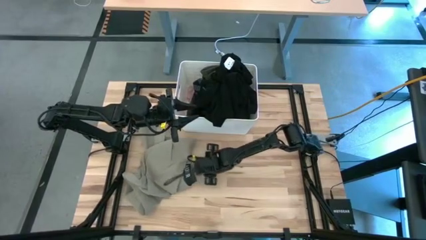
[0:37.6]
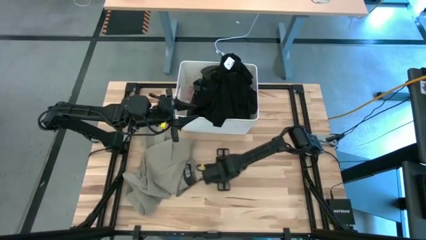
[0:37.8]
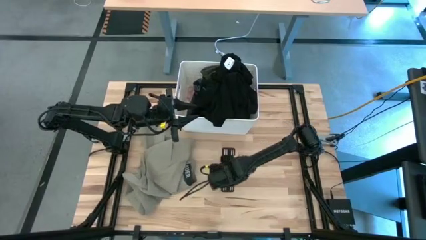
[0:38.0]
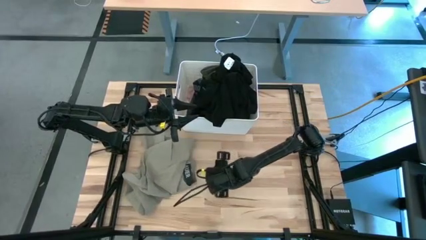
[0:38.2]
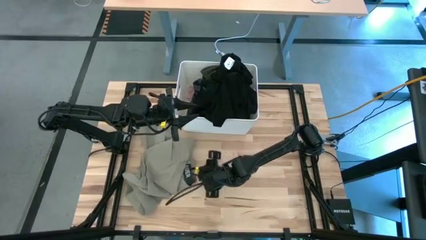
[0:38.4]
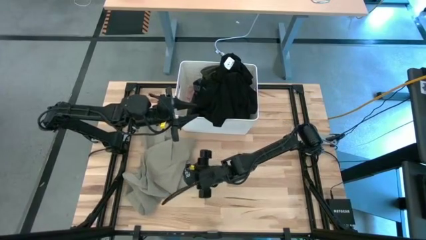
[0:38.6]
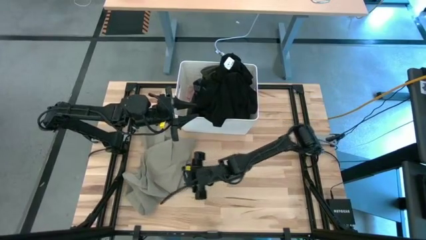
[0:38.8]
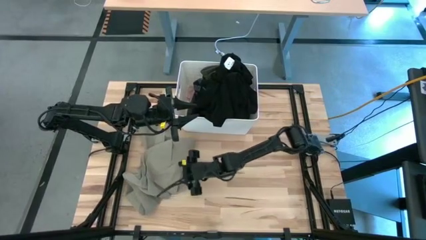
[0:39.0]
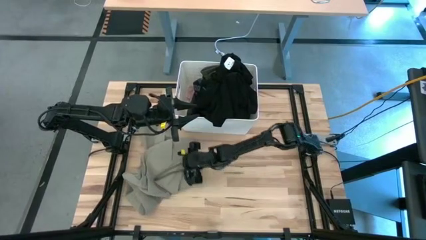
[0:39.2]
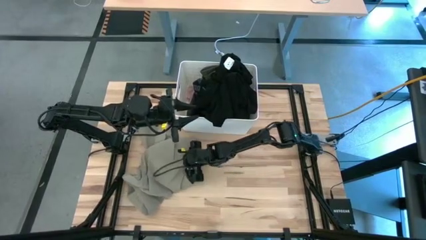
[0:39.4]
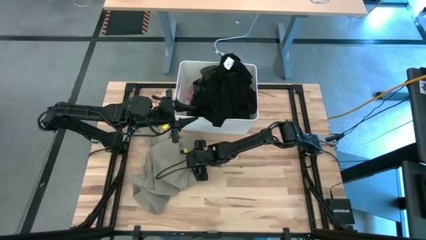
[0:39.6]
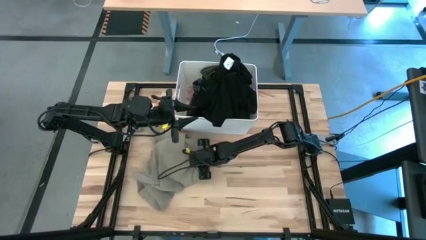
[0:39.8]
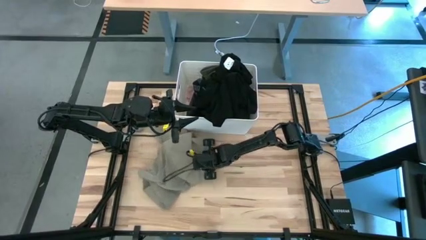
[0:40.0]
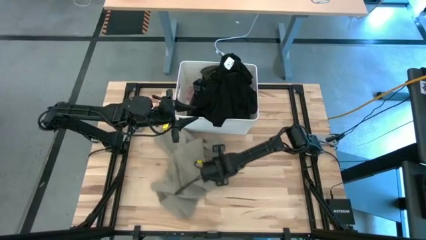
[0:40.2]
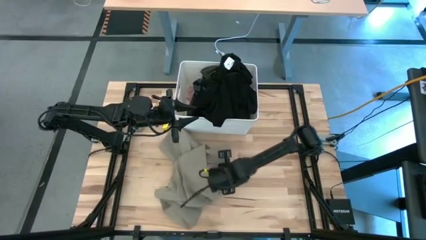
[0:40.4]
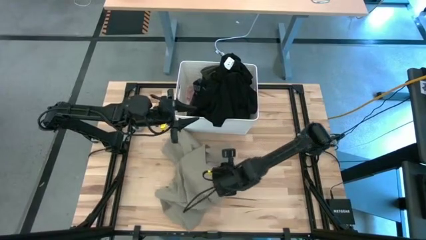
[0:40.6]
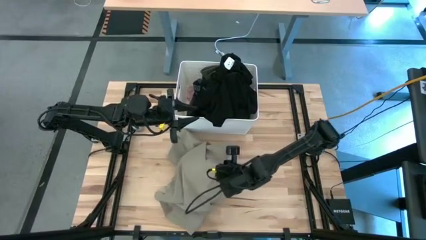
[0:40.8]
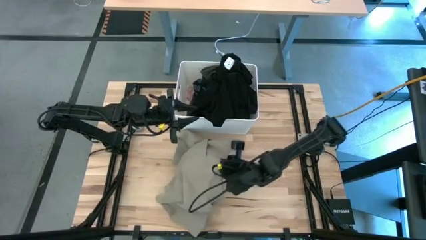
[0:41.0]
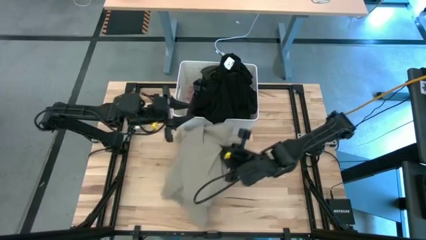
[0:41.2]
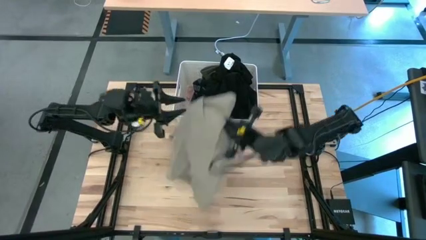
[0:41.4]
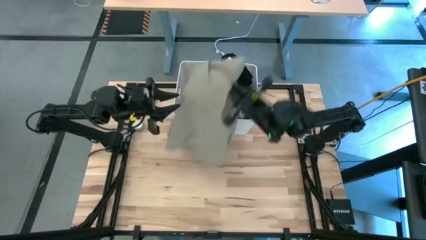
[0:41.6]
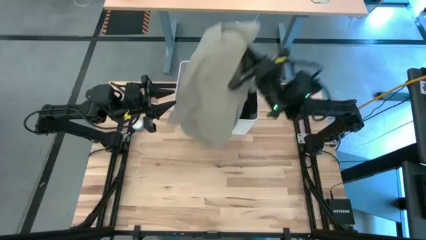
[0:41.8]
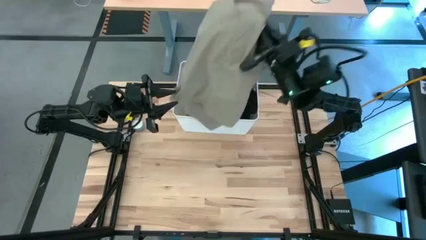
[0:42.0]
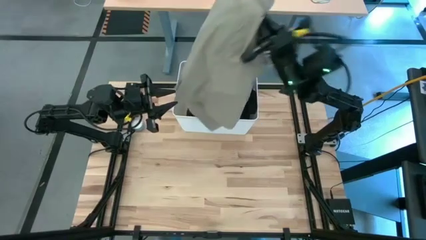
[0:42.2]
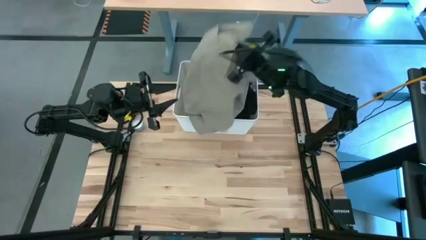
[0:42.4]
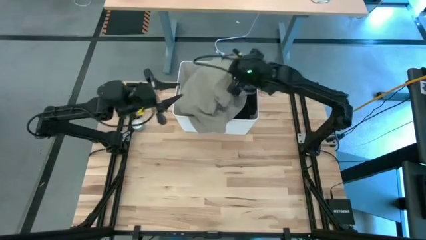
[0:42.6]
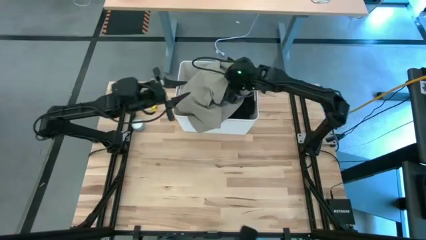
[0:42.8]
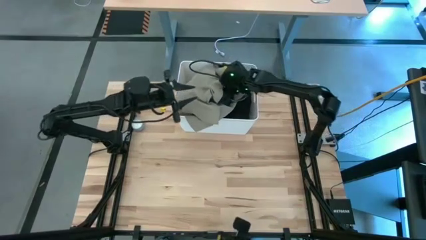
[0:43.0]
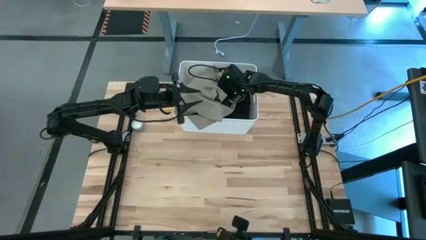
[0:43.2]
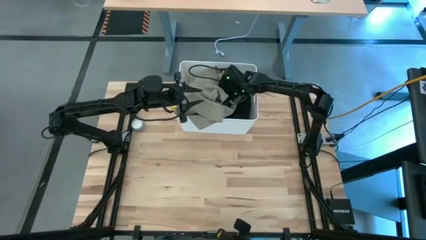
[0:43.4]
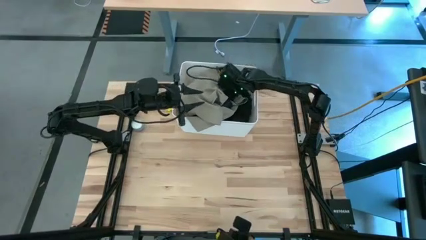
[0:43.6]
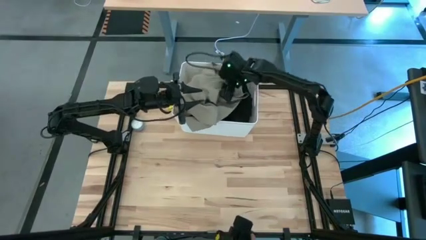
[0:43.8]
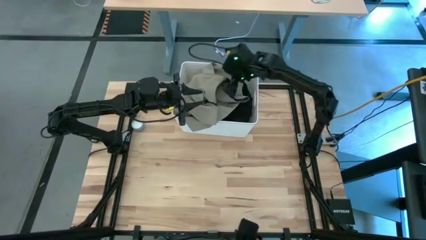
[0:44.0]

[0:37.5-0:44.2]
Task: Sort clothes
Put the brown short into the white laundry bin

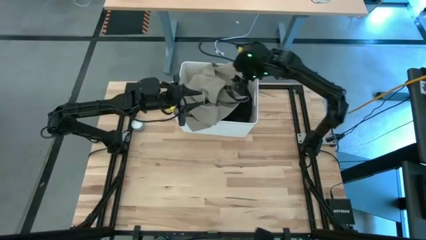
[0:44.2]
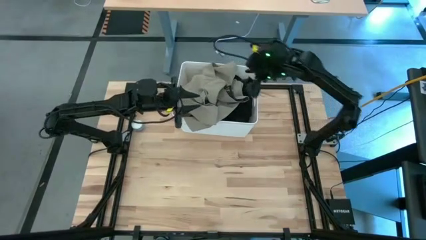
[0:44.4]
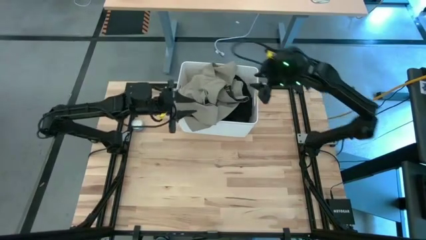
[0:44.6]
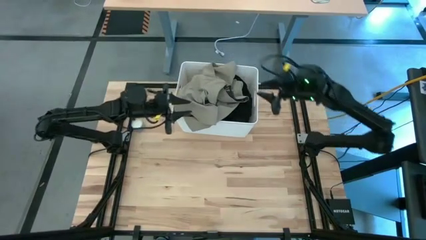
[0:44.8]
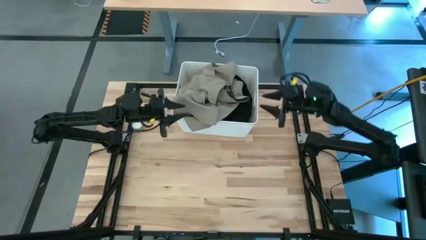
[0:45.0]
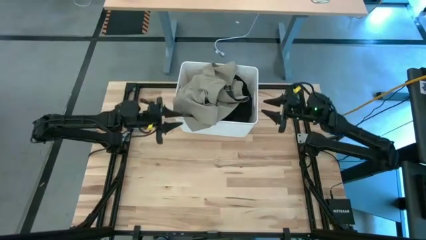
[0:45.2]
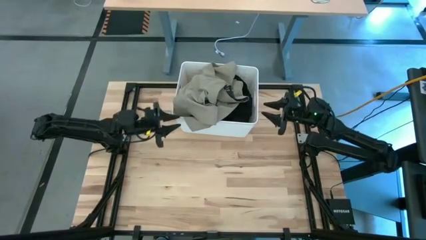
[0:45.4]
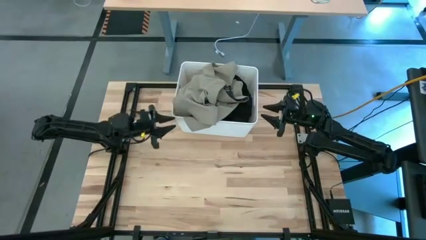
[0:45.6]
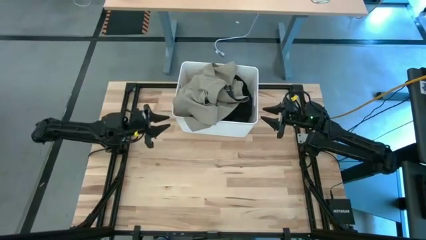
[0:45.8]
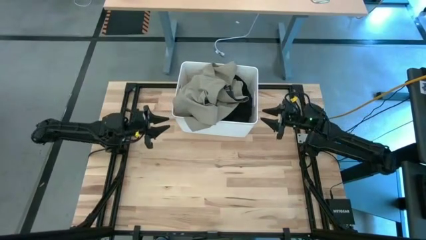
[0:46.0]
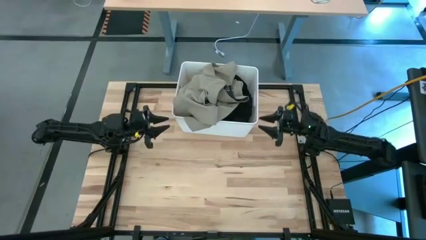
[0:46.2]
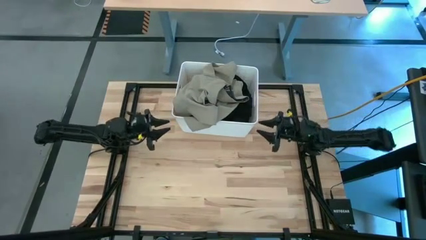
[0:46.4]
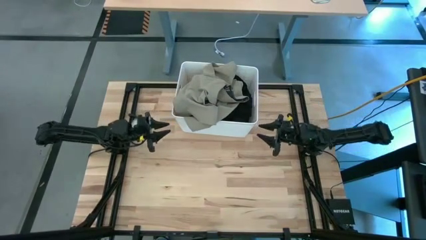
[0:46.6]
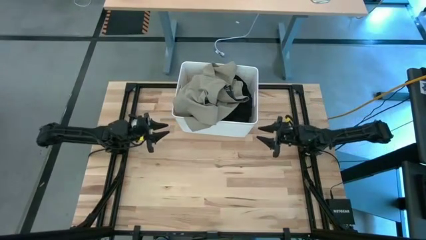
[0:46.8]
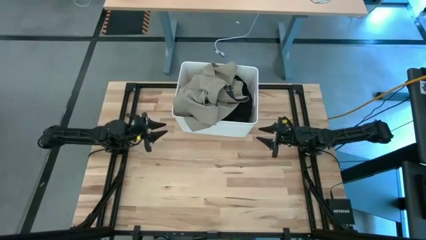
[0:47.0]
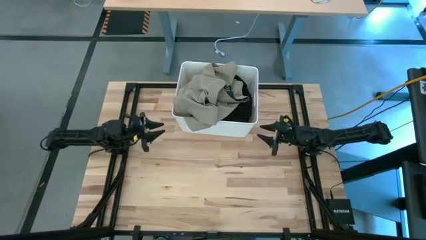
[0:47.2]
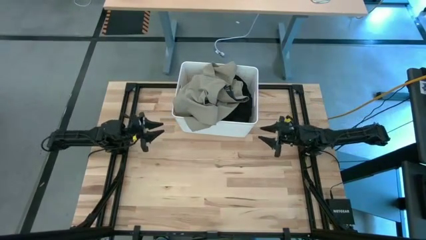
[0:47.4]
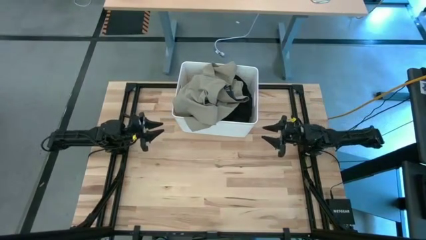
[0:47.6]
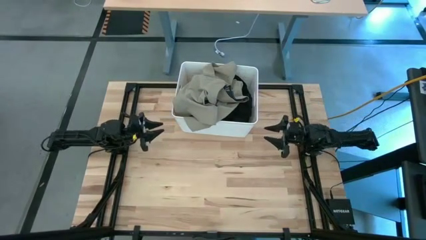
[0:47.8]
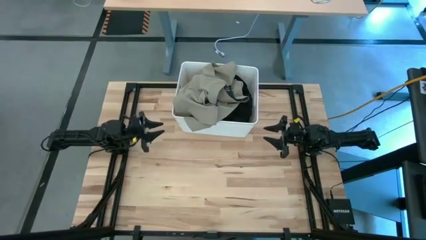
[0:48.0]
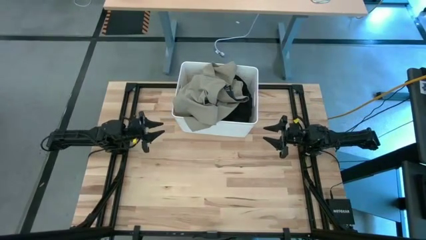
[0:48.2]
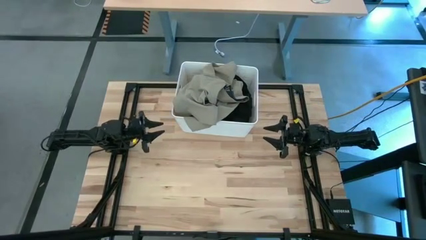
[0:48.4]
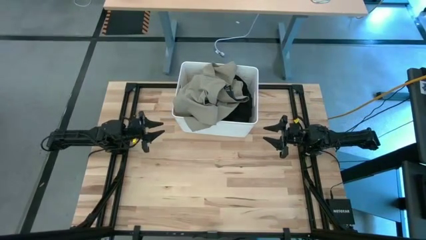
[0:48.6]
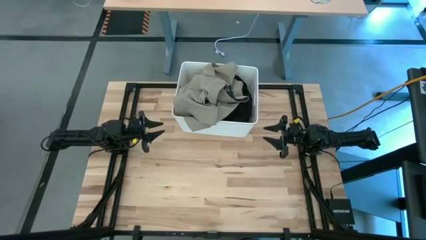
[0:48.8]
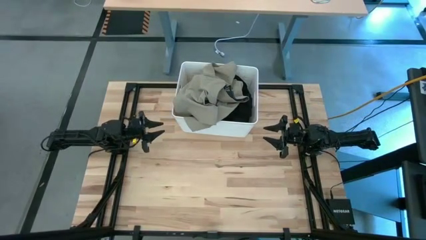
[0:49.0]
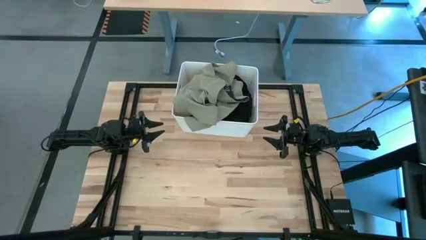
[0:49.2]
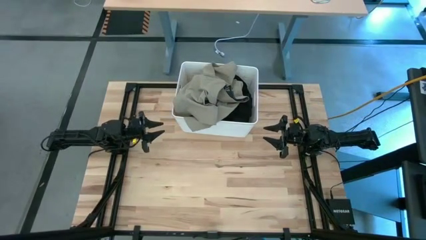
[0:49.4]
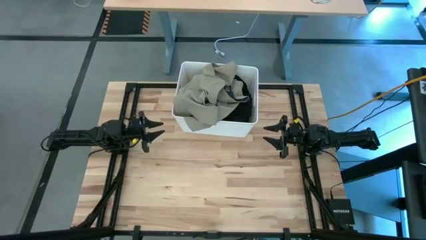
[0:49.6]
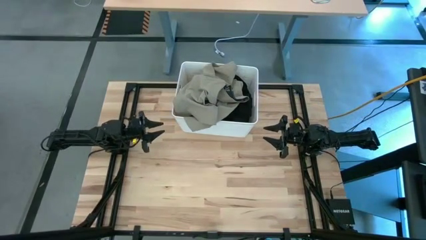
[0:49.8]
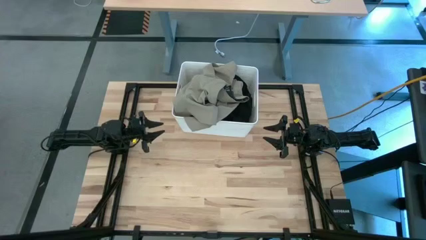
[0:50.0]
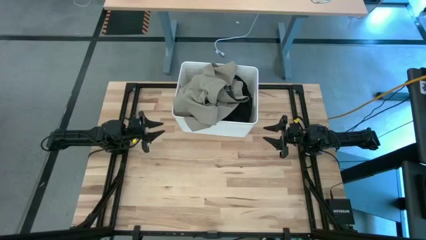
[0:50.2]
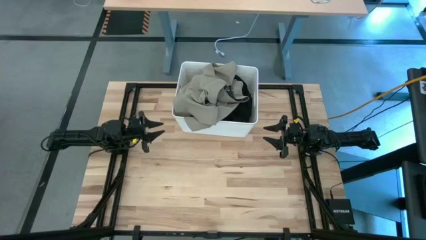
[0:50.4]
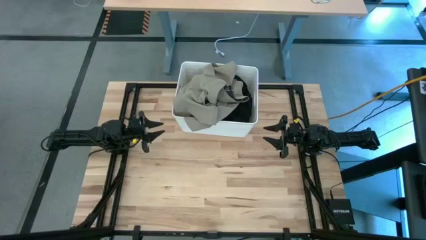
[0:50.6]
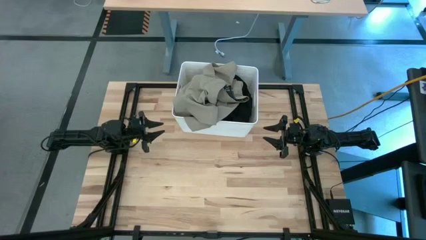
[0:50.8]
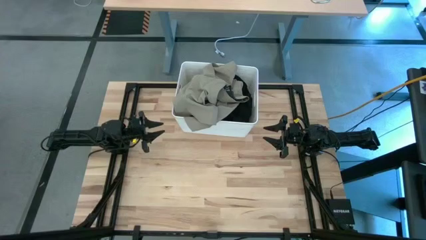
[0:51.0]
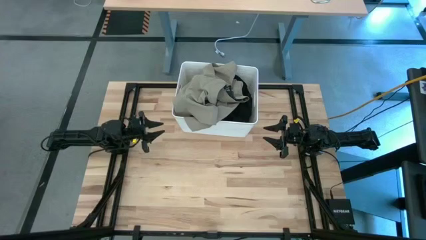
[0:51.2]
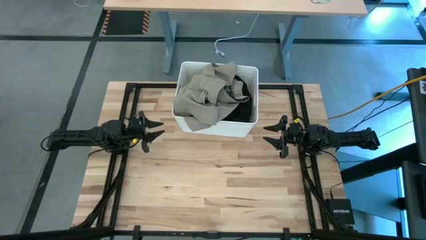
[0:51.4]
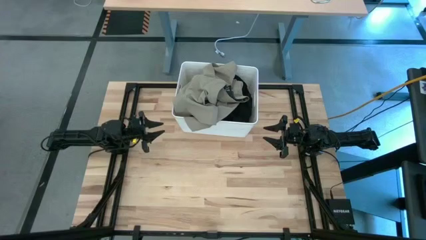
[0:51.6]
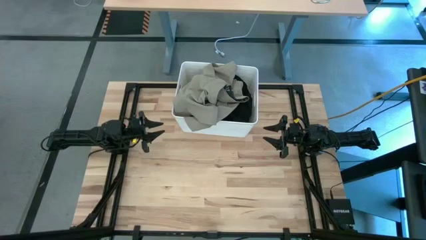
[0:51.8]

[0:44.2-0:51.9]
Return to Home Position
